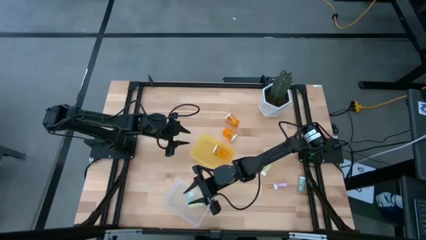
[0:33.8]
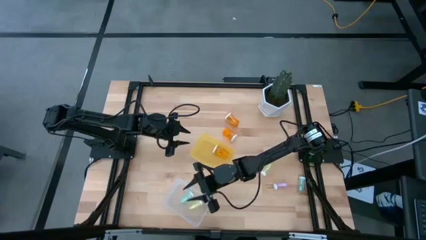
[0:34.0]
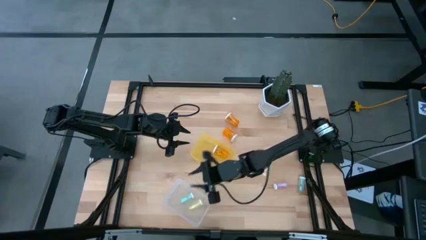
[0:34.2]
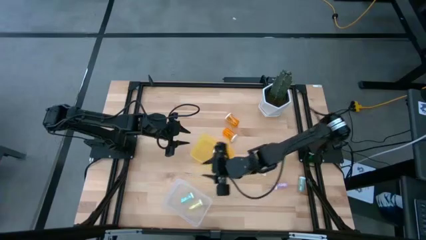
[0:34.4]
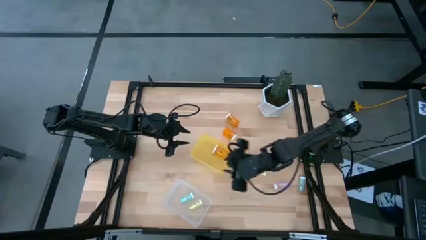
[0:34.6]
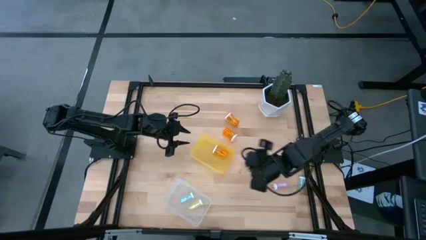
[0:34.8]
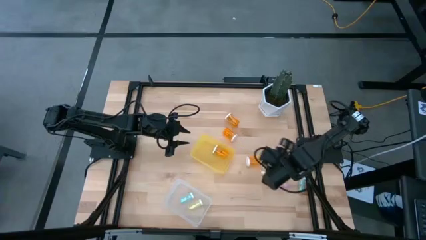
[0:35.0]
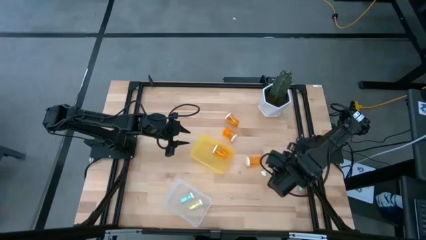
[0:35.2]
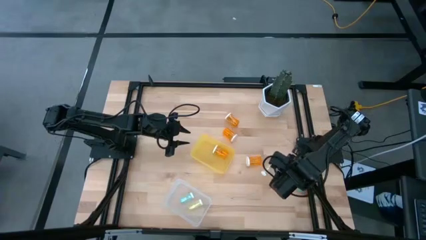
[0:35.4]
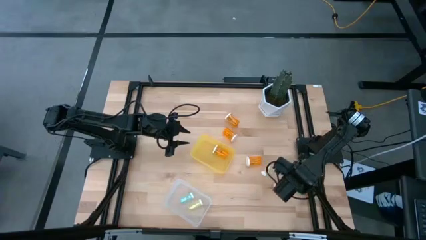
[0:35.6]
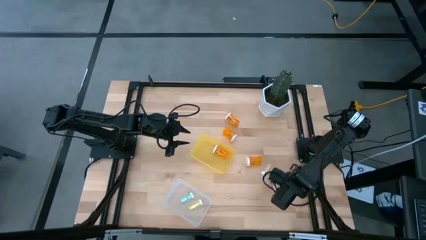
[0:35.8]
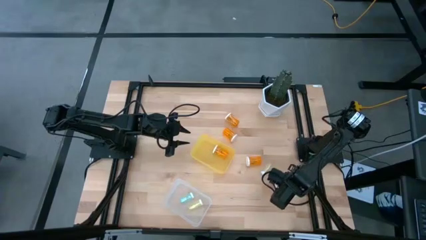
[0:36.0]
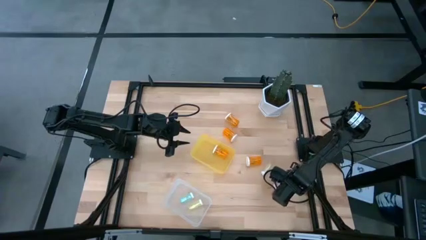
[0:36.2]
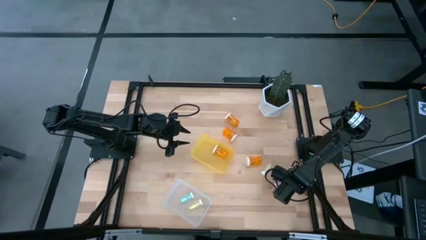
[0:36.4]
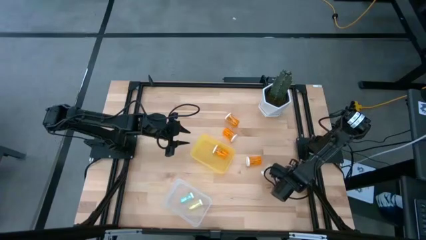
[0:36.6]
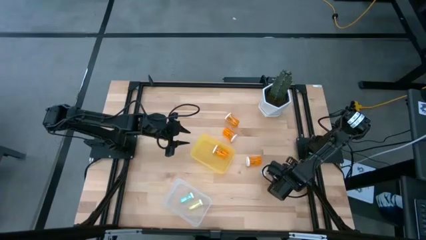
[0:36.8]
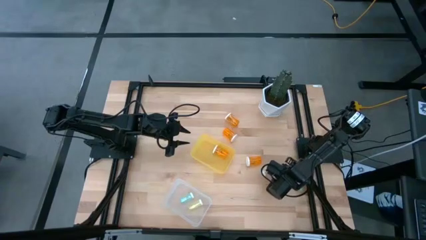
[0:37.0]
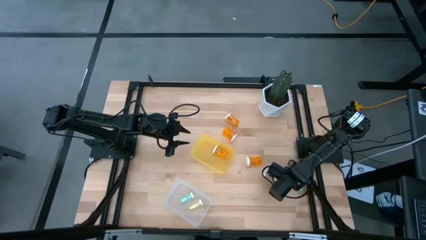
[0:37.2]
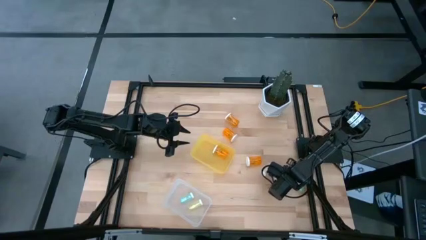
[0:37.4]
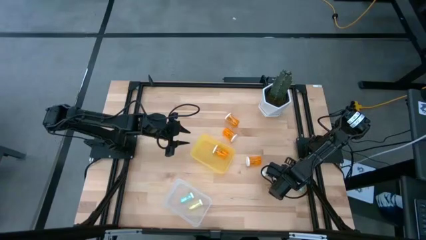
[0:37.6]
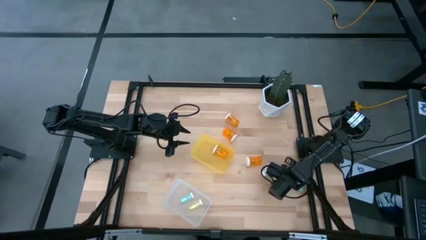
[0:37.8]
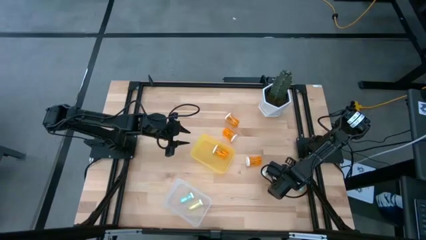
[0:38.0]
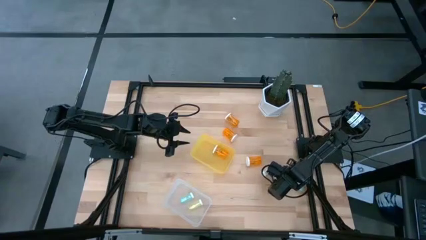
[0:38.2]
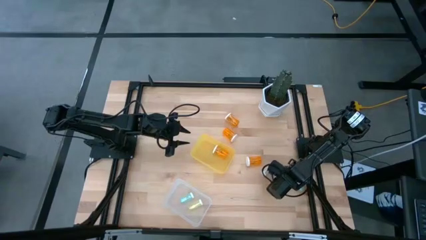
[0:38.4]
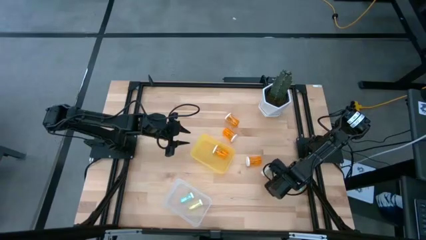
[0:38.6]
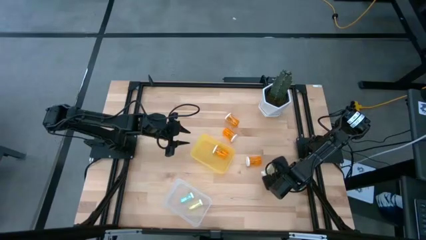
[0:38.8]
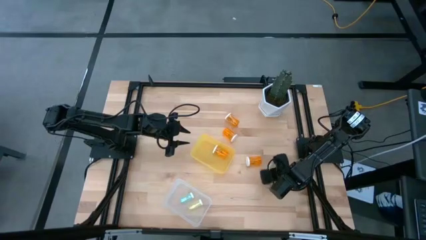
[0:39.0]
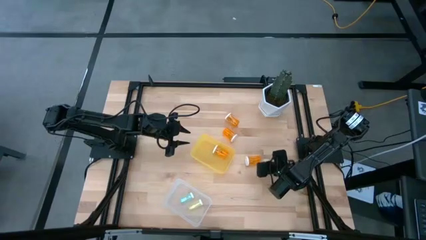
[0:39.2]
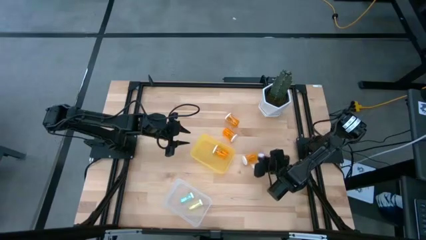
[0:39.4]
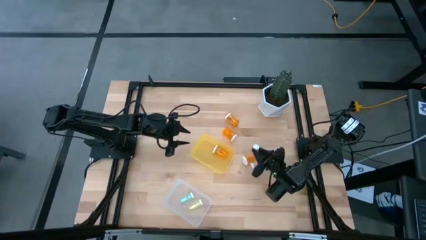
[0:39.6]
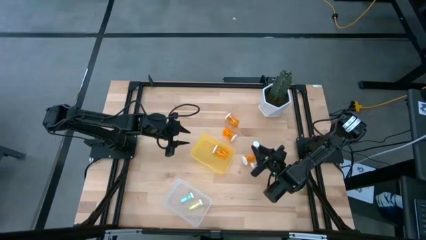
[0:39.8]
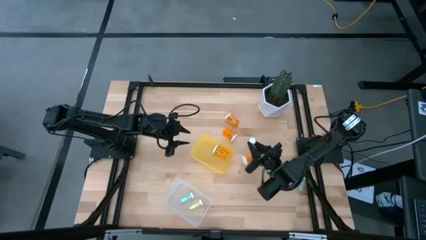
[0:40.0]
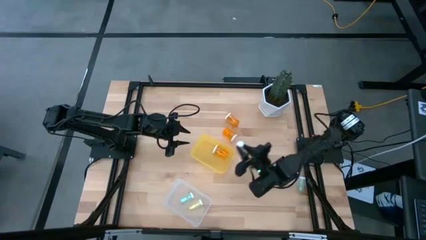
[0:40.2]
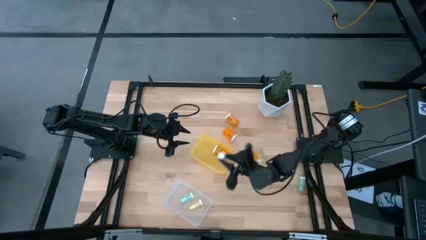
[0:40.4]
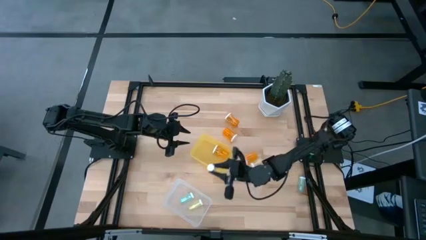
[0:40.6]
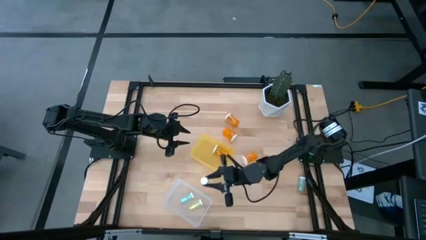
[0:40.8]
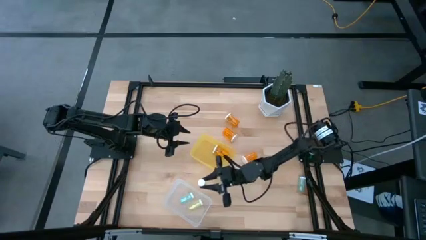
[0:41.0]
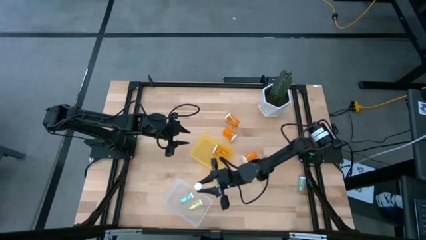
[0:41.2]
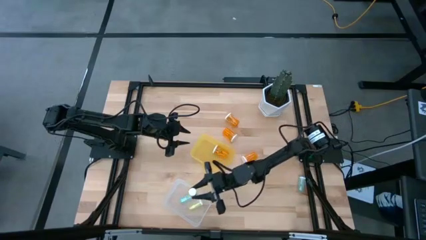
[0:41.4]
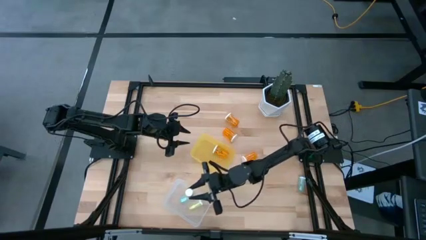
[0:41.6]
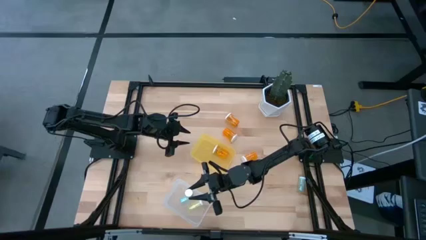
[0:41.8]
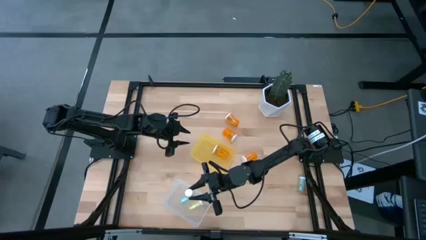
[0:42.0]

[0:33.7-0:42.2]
Task: Pick and place medicine bottles into bin by pill shape (circle, oval)
Put the purple bottled tablet into the transparent bin

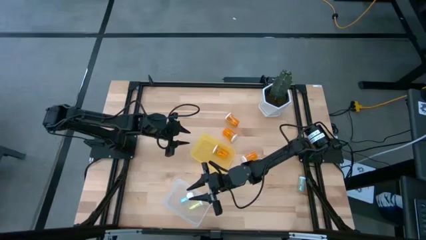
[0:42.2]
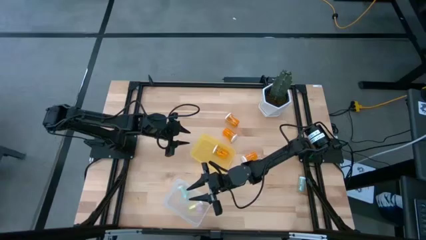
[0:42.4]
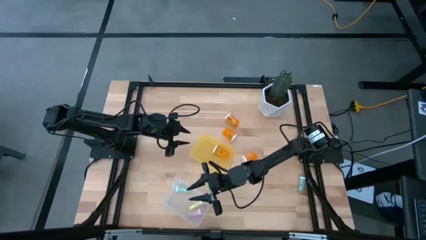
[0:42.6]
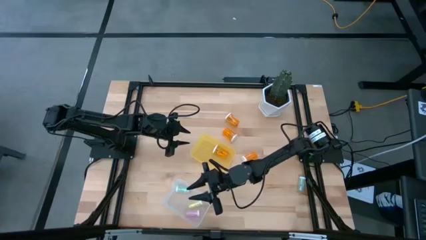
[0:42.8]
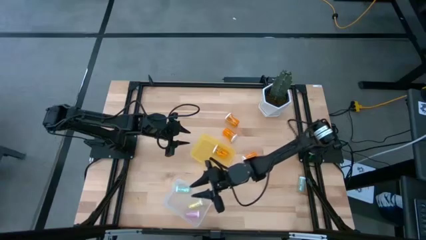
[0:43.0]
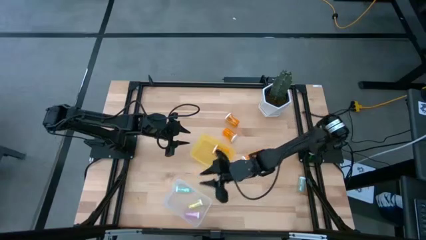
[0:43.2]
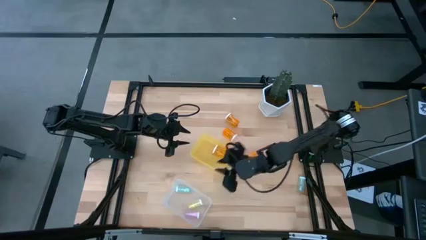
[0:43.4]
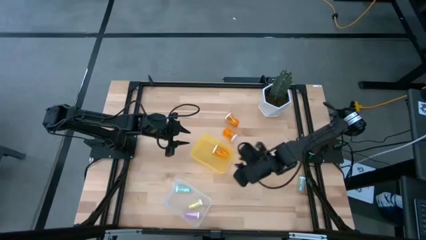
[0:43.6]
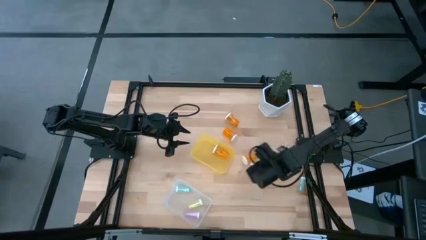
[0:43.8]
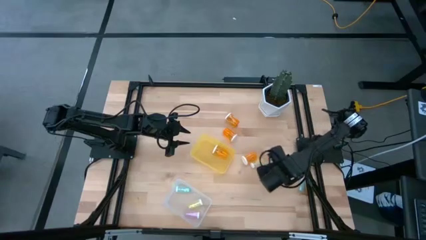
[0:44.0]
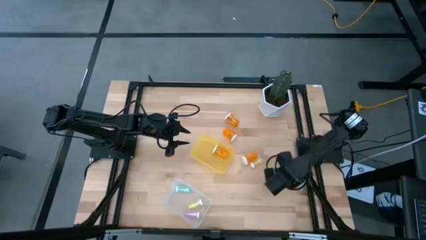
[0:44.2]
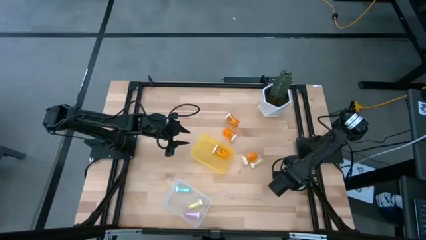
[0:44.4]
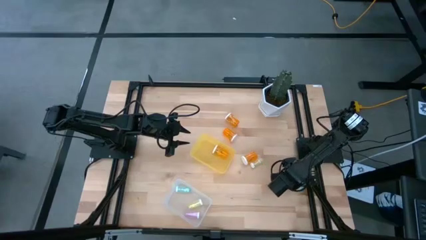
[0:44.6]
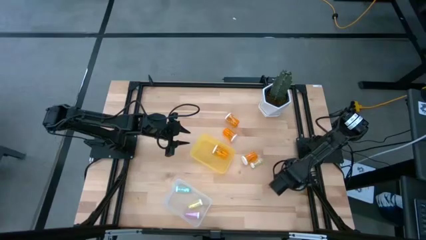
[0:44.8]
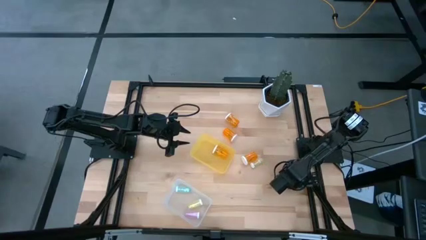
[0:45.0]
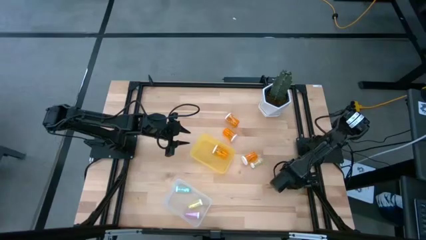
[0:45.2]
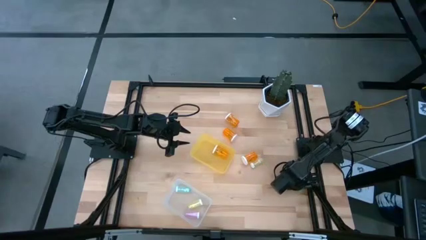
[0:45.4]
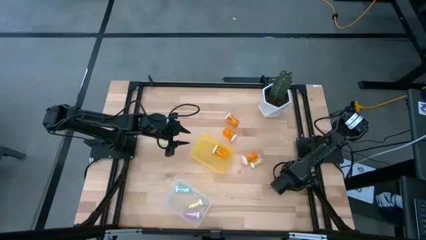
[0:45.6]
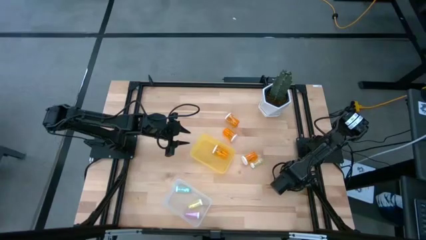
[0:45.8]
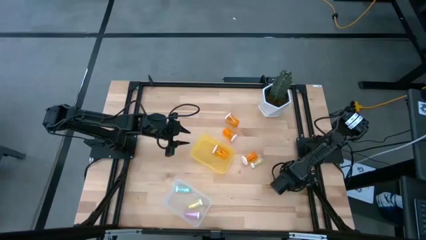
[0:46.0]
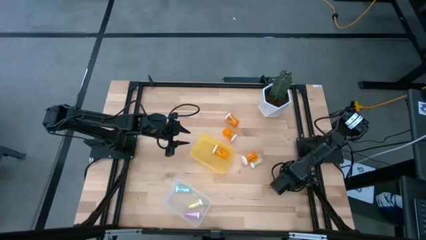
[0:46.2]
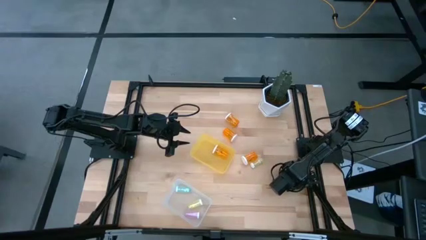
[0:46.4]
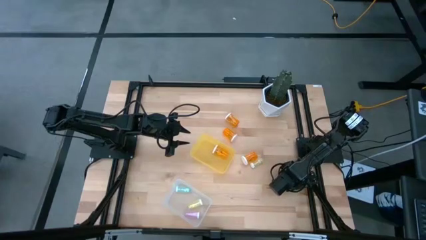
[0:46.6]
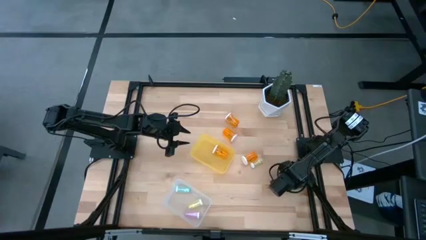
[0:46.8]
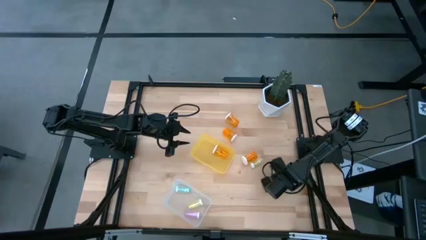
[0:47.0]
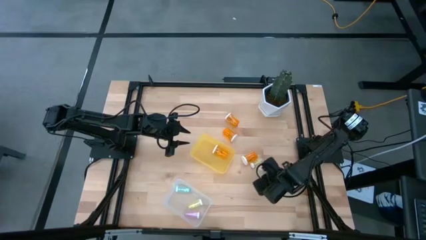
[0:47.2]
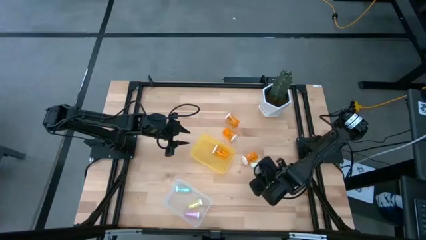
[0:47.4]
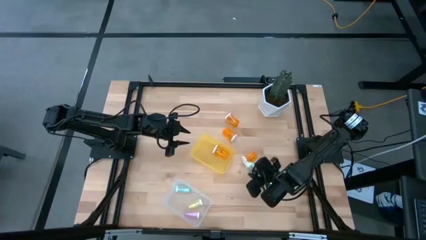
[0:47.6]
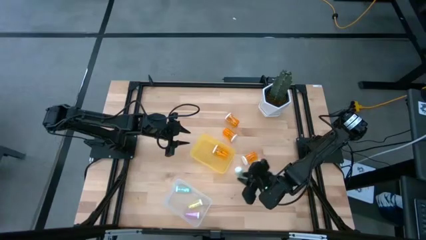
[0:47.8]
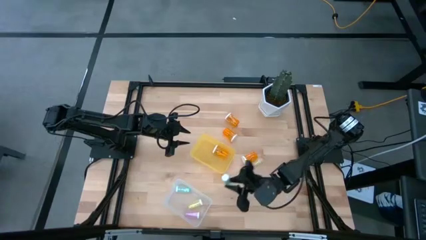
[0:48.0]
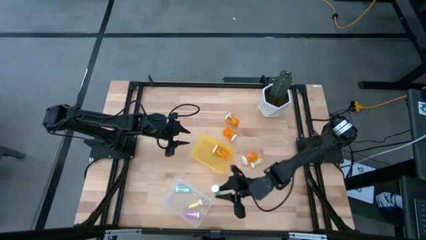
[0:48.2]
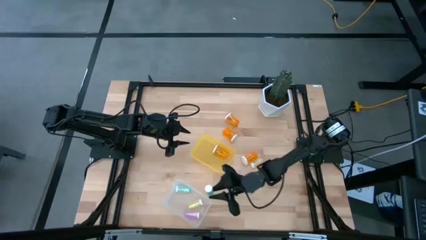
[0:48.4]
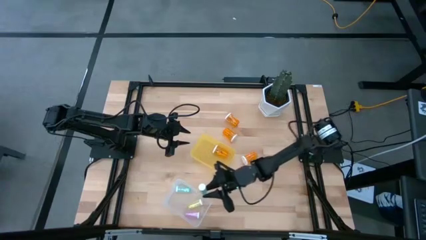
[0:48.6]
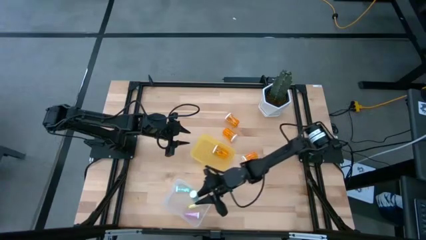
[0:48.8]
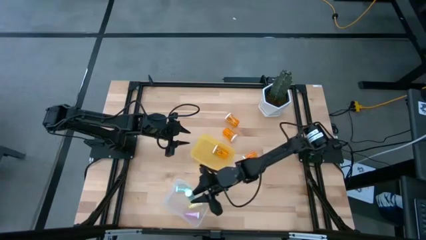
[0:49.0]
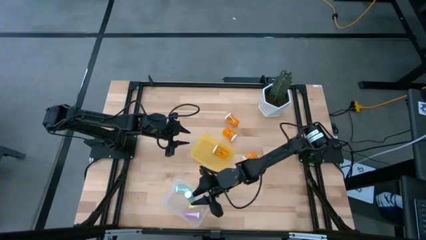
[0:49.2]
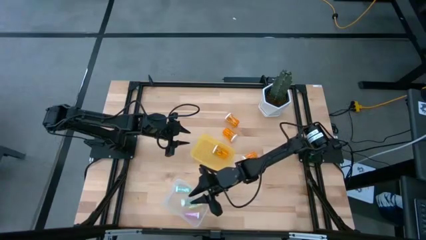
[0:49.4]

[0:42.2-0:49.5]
Put the green bottled tablet into the transparent bin
